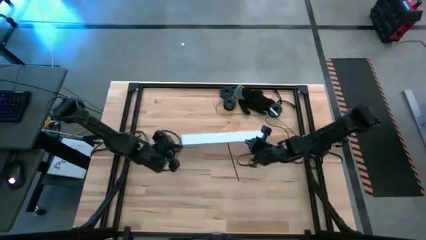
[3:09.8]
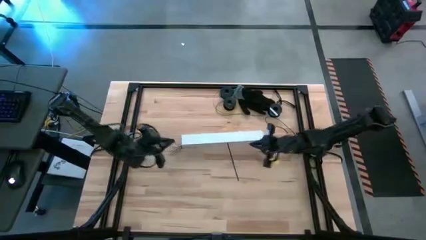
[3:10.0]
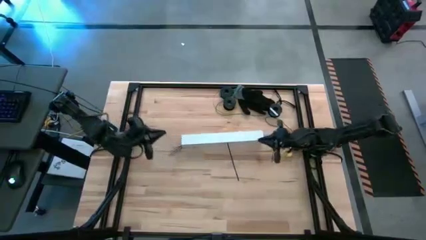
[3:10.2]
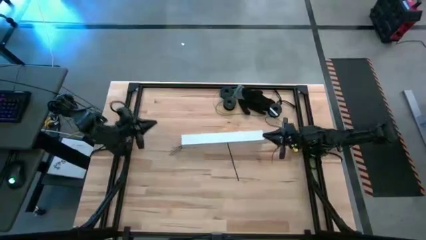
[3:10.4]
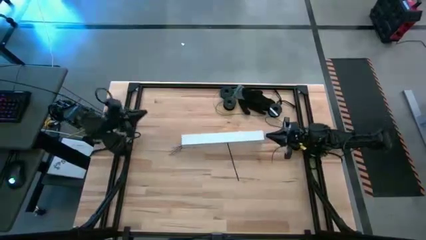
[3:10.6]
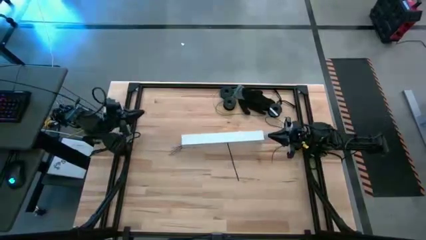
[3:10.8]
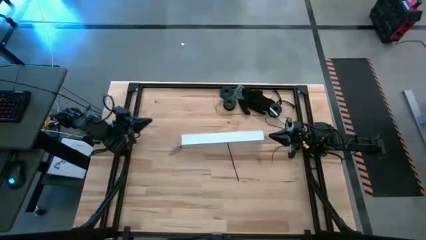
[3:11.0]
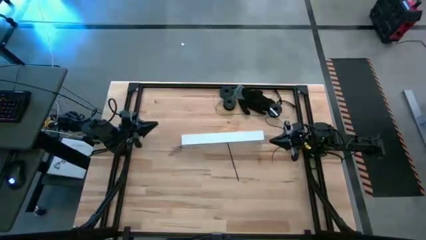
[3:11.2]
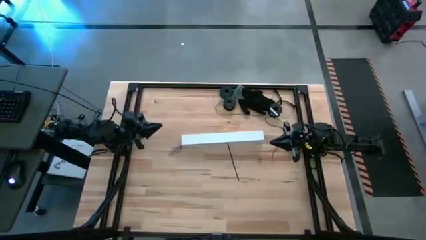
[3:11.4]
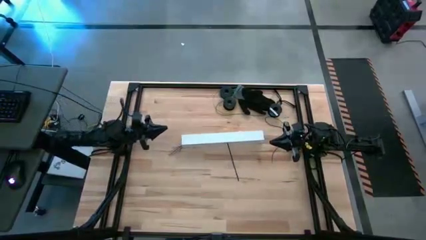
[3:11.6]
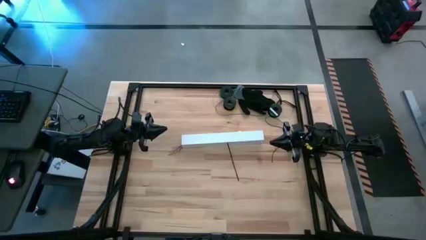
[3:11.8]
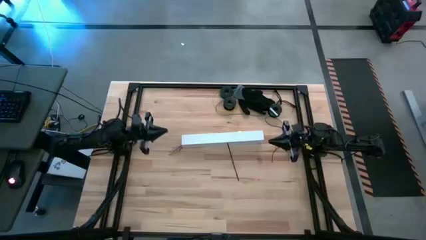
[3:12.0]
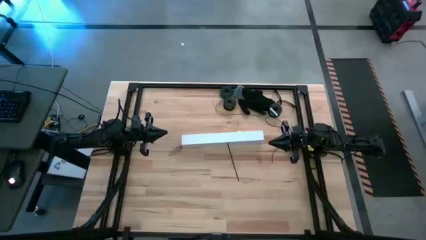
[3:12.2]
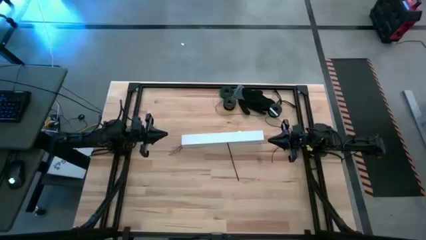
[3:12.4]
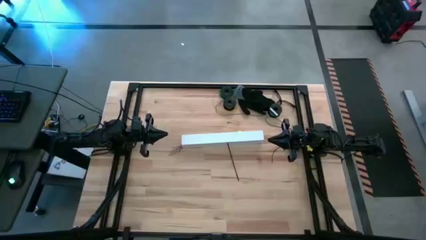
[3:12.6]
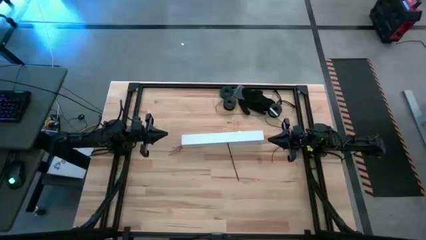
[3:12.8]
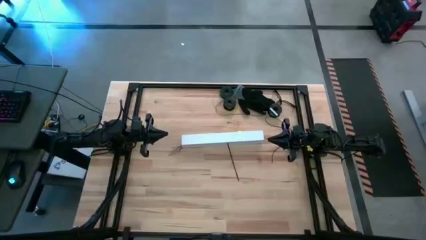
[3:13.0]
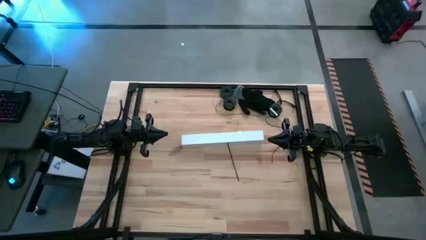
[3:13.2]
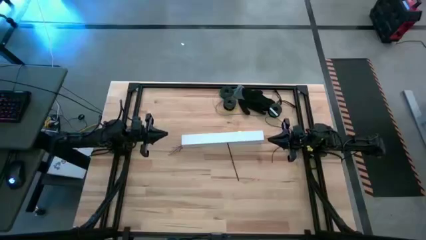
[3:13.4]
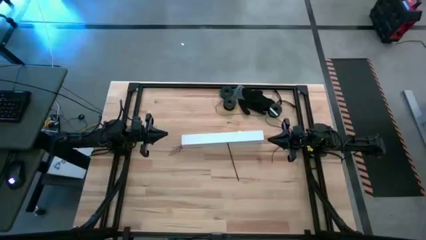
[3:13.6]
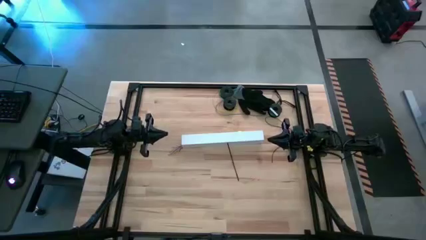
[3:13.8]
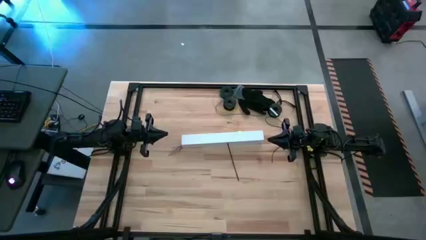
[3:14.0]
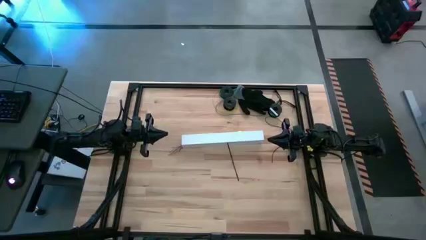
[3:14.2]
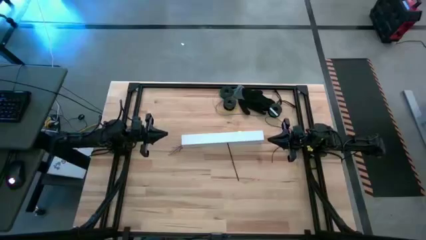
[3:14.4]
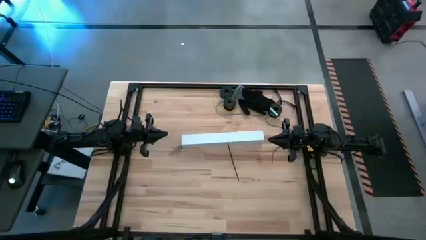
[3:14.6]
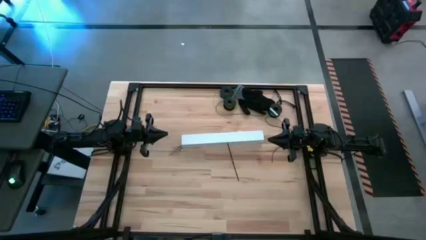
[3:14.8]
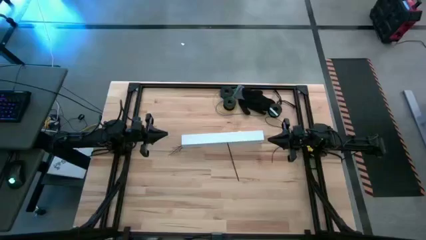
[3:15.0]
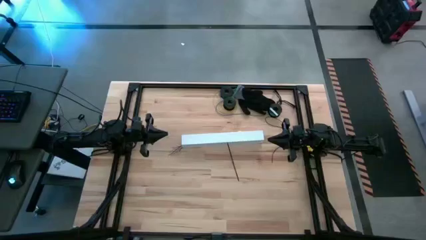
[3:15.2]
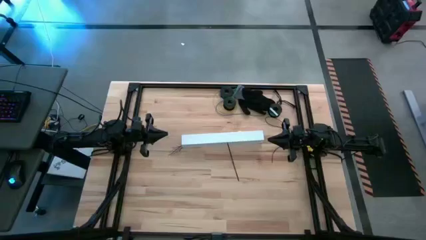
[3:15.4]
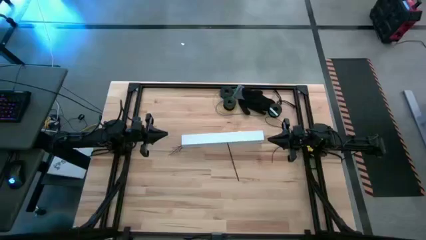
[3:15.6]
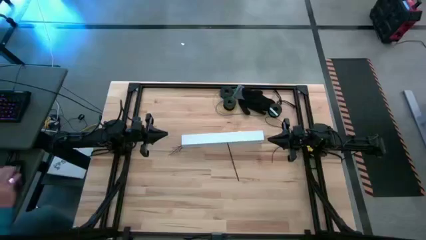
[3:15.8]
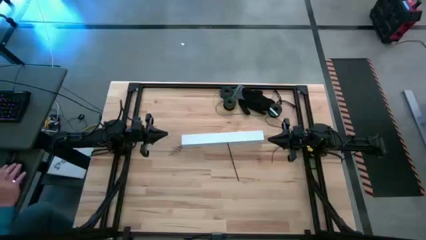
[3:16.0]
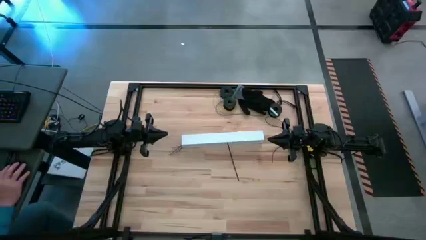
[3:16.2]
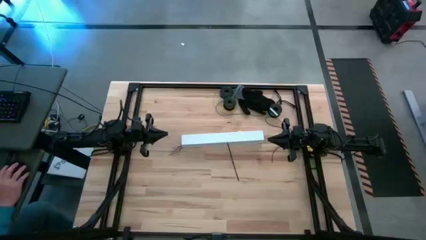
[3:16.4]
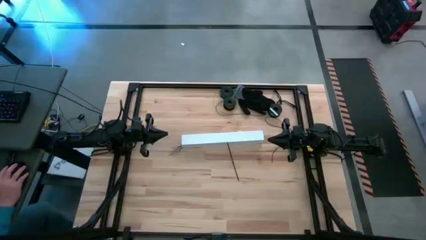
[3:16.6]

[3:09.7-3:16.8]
Task: Ziptie cables
Return to Home Position

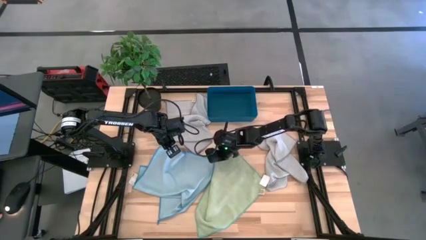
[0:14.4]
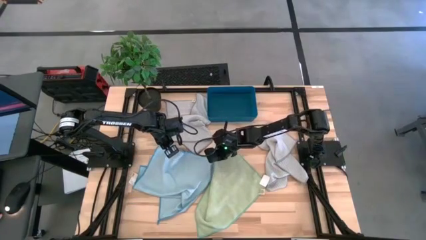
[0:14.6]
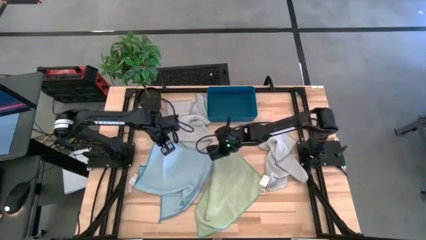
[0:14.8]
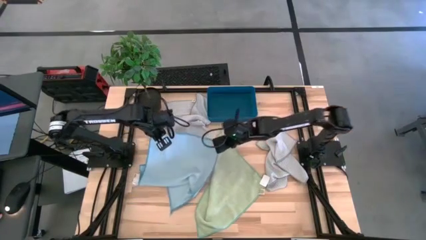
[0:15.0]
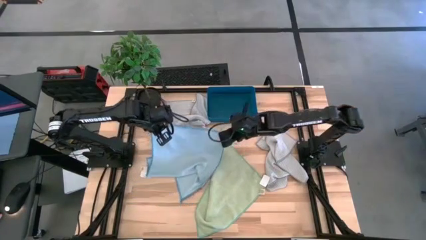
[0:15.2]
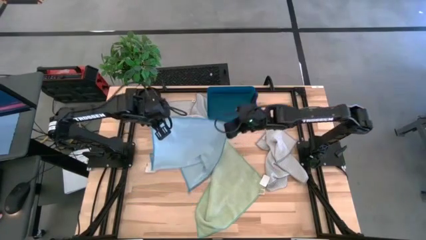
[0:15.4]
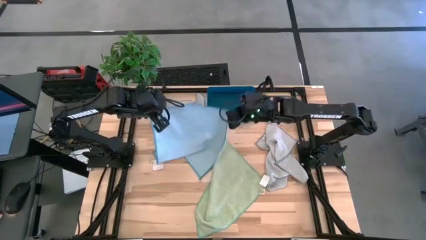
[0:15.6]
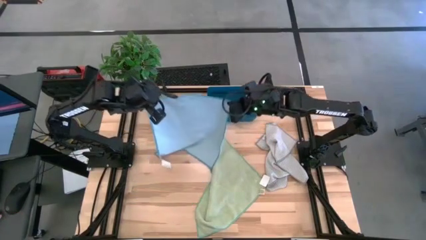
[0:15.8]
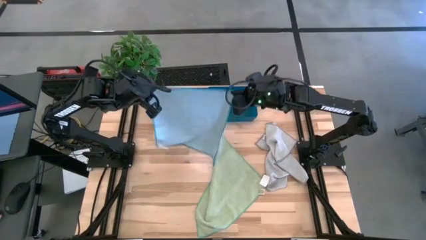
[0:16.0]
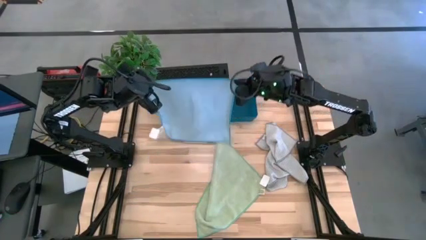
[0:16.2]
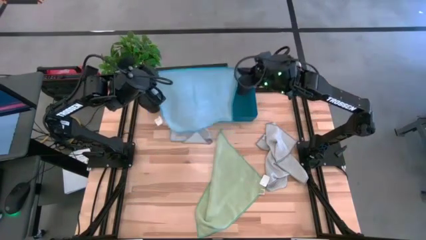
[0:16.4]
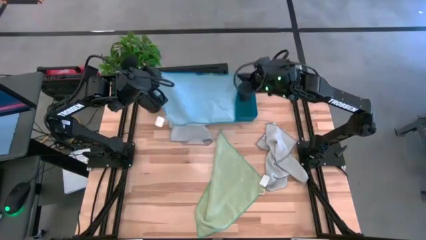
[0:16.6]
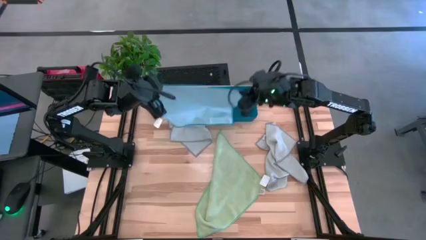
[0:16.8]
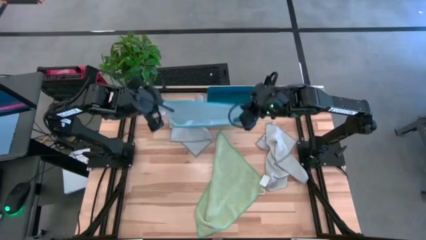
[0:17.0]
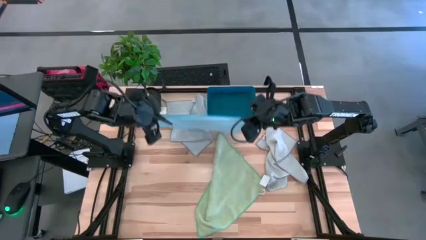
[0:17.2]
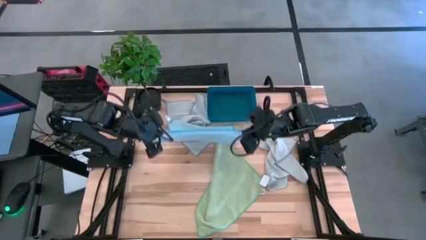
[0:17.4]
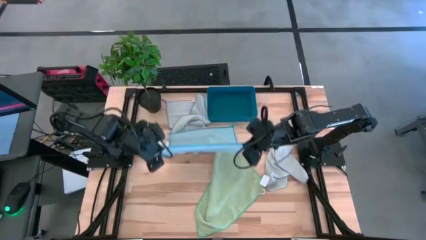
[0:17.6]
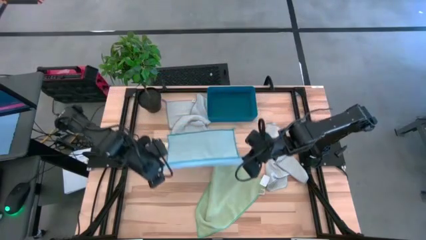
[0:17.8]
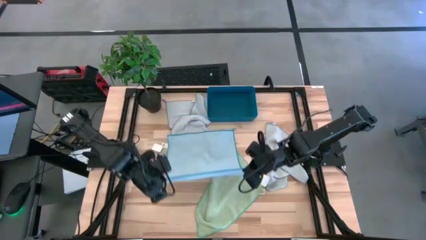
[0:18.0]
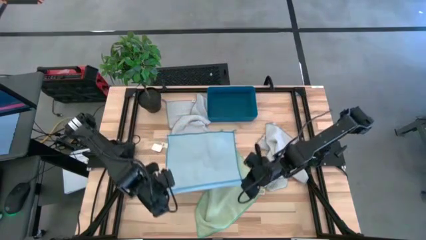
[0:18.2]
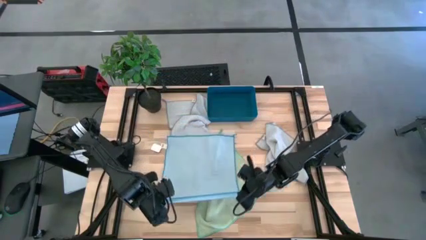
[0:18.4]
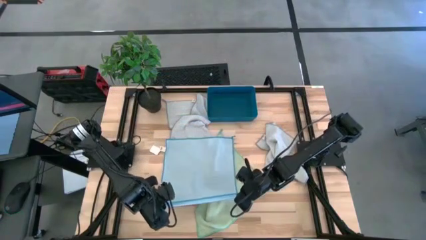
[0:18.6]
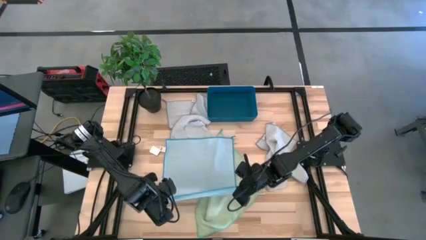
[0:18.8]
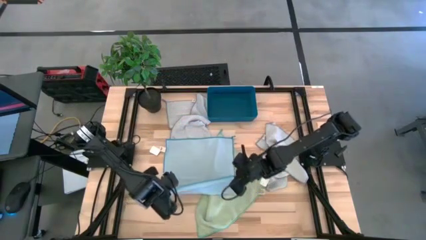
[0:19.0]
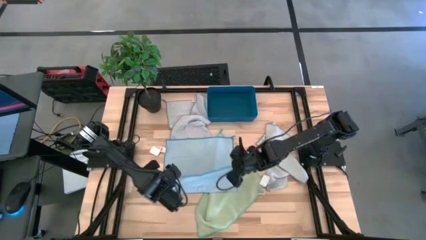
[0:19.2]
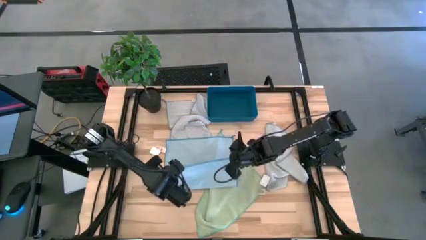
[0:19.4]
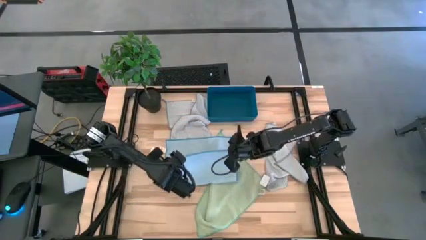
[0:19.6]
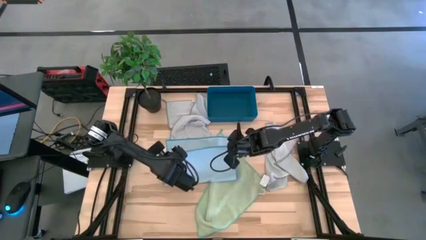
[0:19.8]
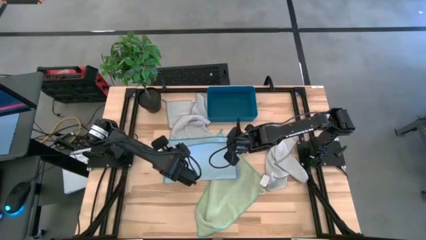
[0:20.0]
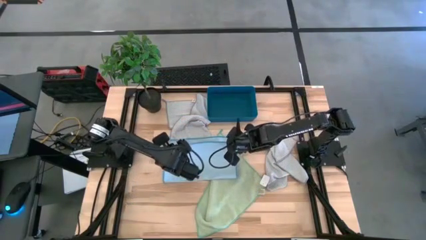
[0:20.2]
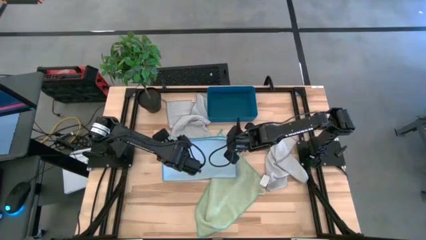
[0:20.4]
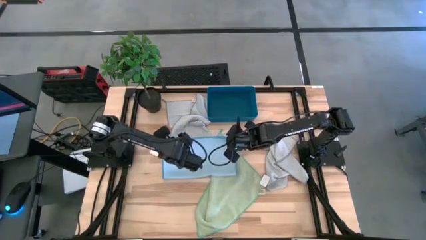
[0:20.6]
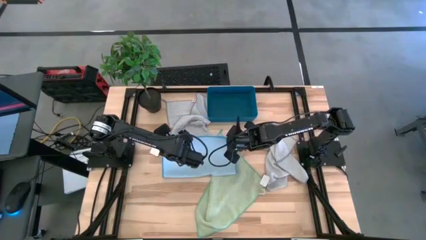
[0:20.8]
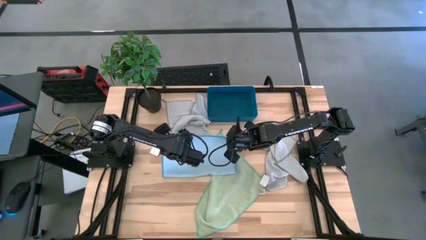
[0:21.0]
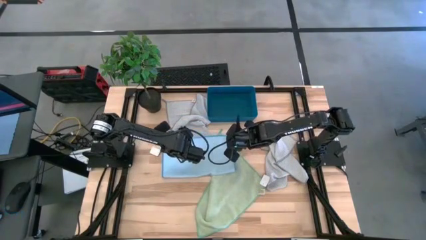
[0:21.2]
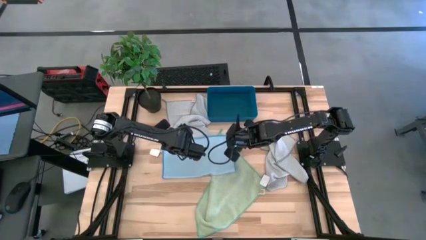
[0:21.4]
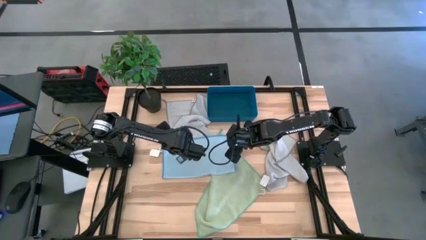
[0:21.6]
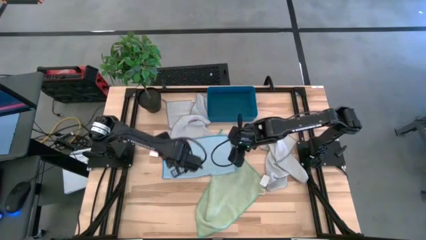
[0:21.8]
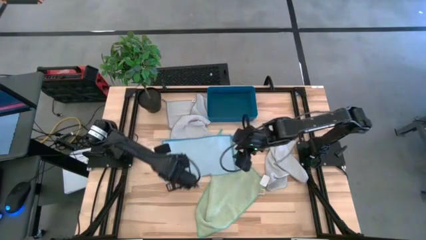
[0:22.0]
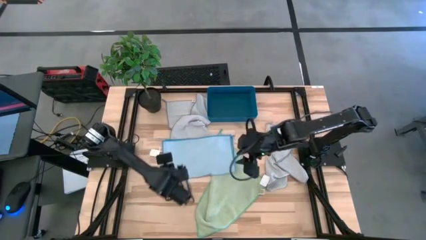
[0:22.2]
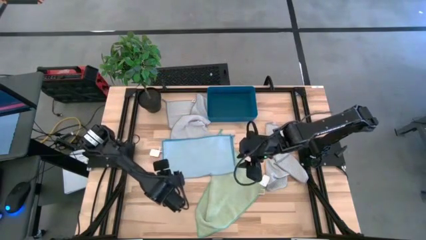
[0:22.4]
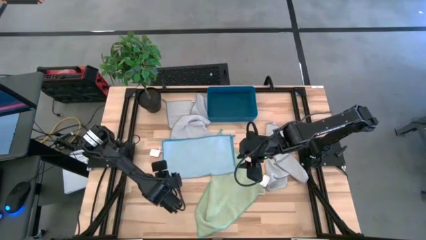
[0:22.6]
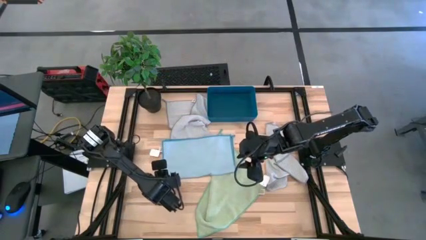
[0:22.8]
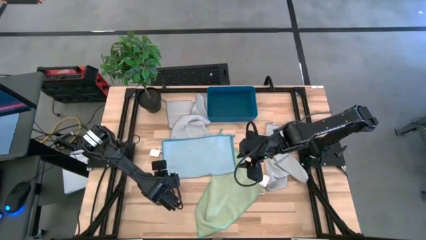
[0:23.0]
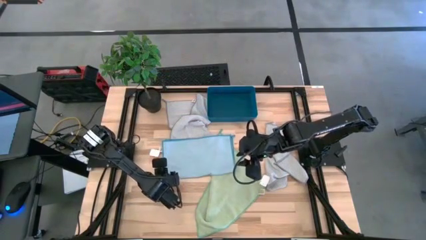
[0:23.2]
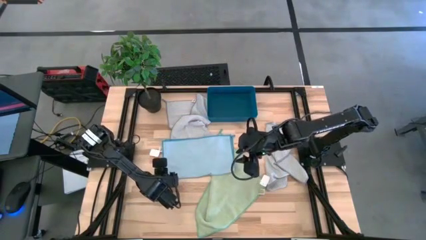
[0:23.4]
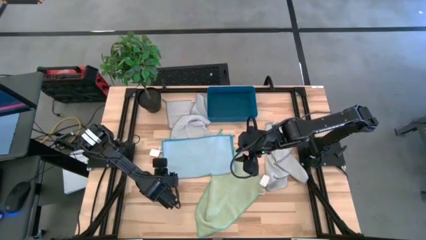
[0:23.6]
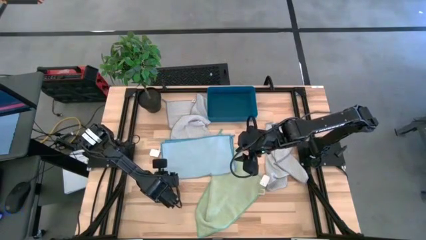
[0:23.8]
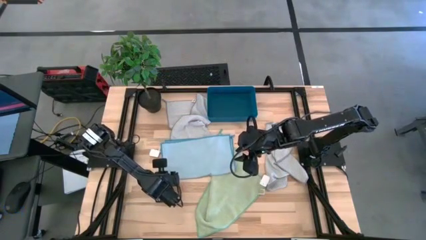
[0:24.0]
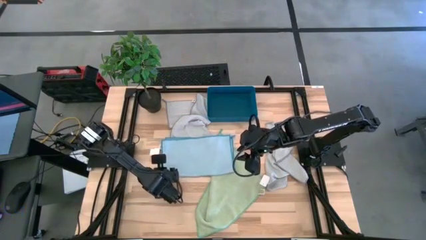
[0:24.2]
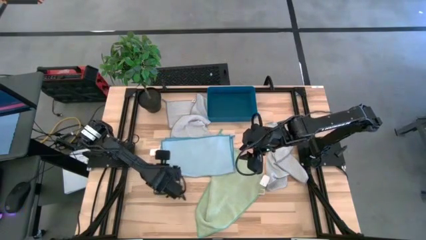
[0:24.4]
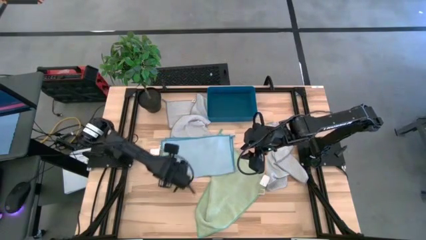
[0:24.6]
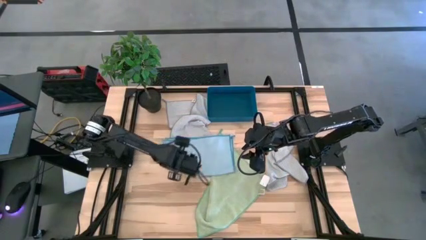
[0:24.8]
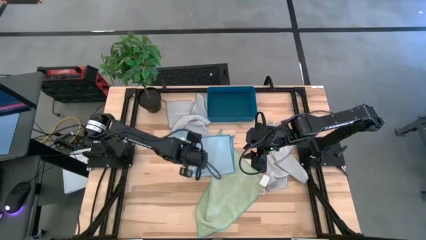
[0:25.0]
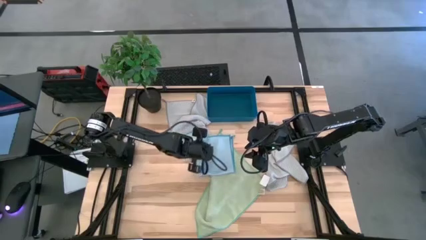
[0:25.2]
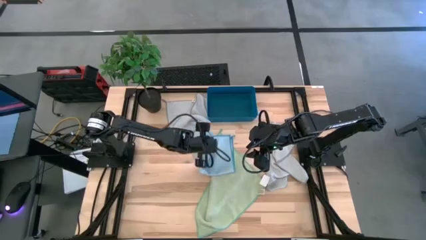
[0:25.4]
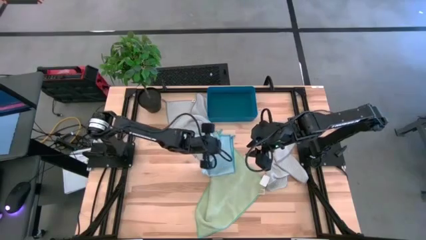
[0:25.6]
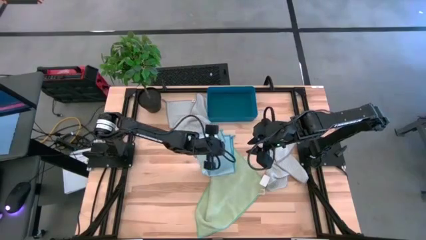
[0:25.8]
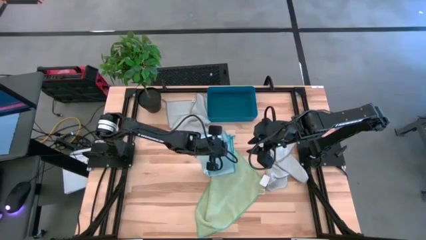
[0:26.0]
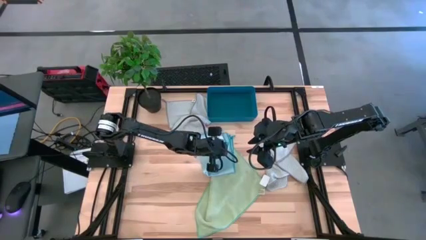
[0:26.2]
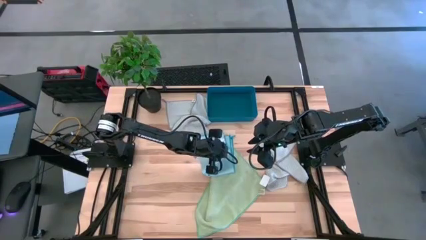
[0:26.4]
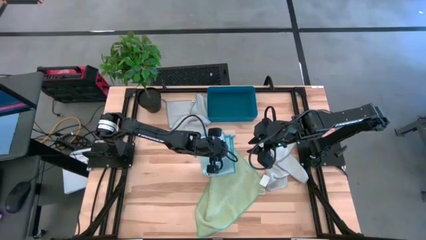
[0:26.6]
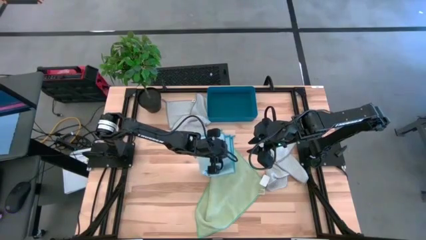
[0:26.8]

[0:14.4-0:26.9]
Task: Fold microfiber towels
Fold the blue towel
